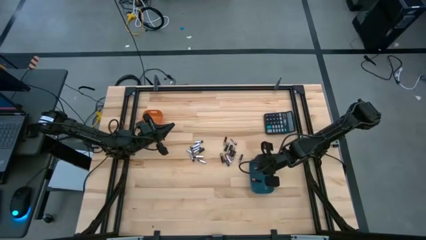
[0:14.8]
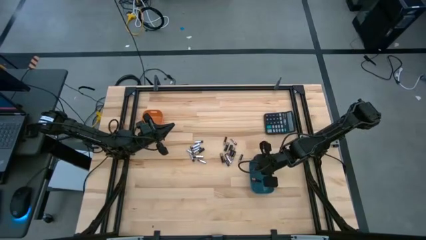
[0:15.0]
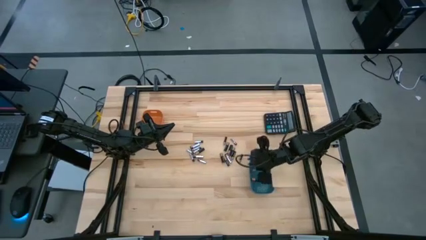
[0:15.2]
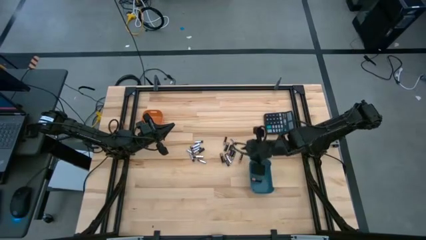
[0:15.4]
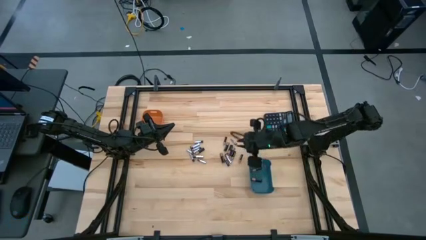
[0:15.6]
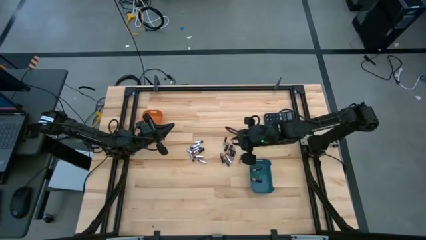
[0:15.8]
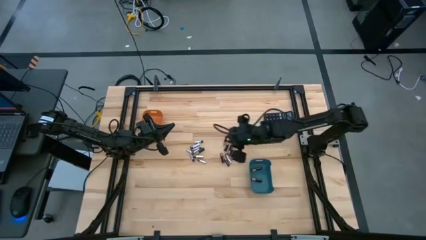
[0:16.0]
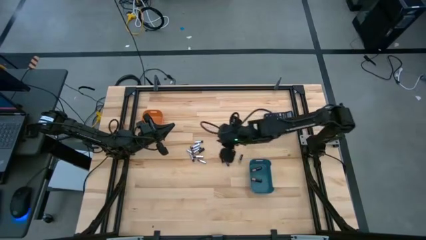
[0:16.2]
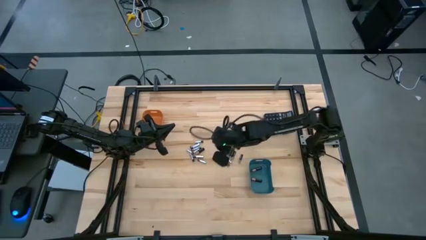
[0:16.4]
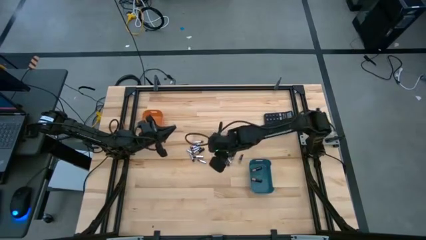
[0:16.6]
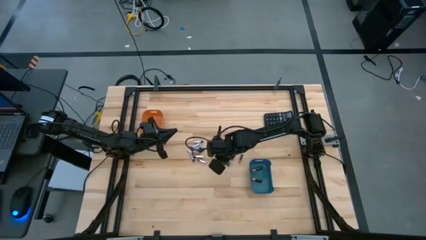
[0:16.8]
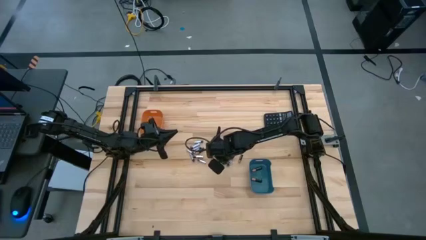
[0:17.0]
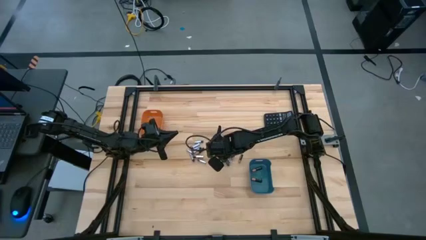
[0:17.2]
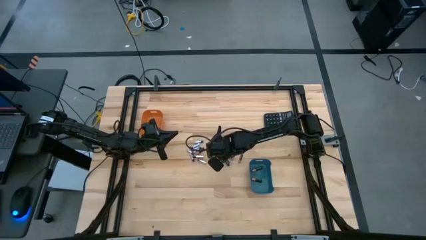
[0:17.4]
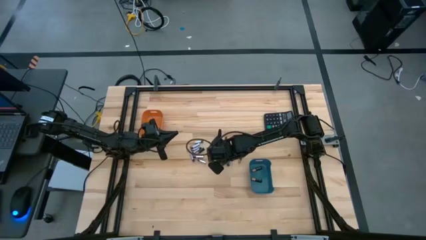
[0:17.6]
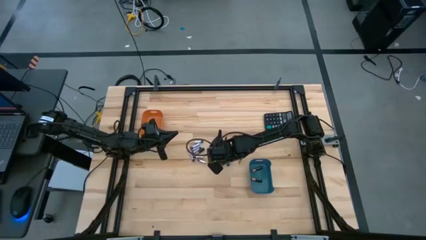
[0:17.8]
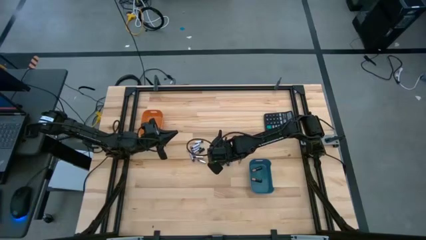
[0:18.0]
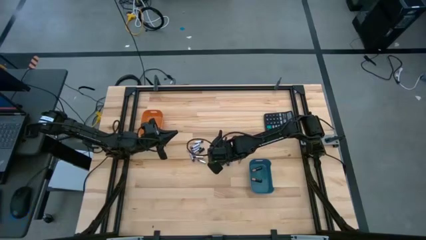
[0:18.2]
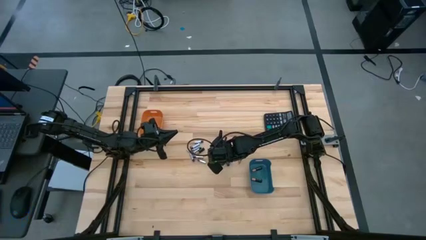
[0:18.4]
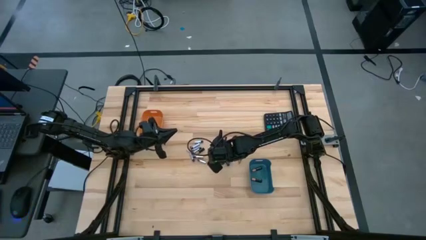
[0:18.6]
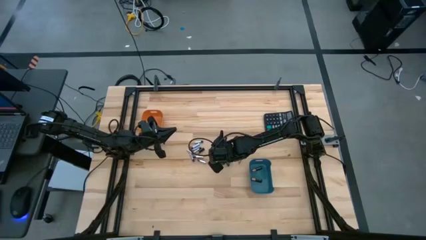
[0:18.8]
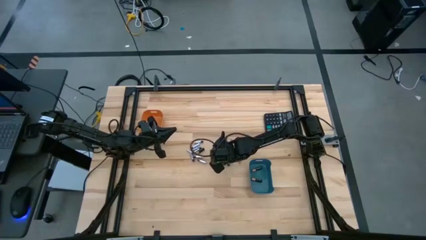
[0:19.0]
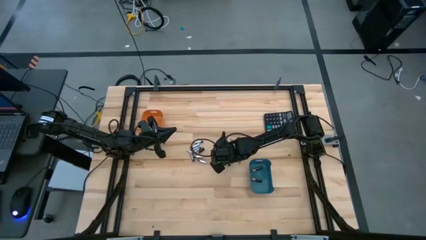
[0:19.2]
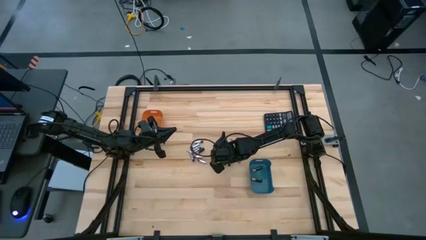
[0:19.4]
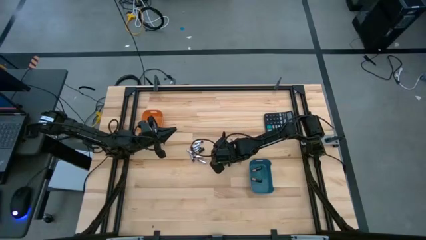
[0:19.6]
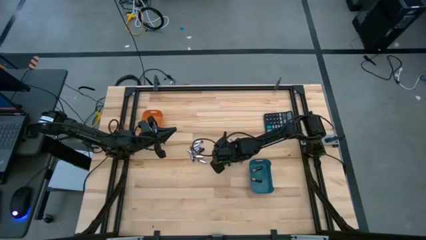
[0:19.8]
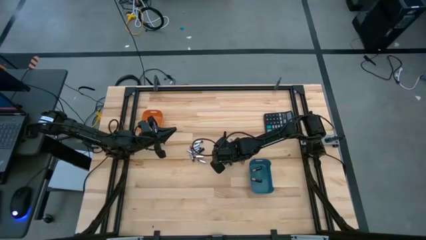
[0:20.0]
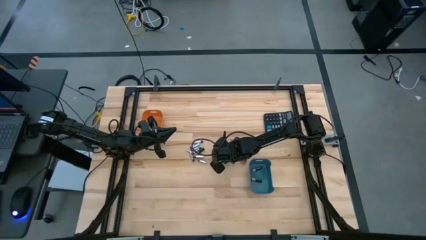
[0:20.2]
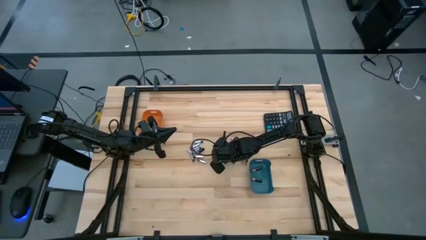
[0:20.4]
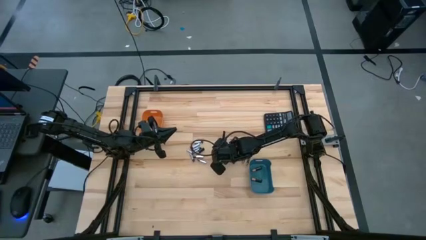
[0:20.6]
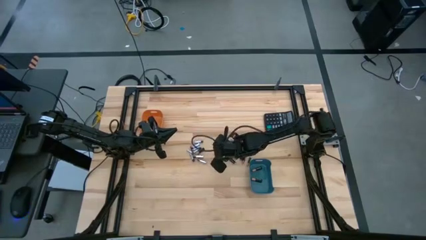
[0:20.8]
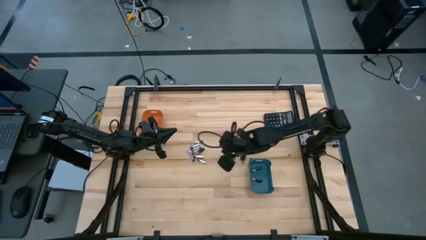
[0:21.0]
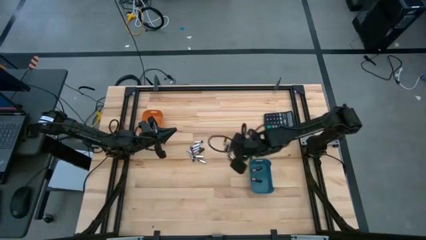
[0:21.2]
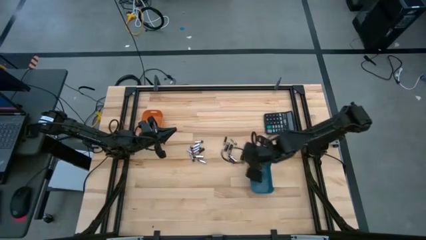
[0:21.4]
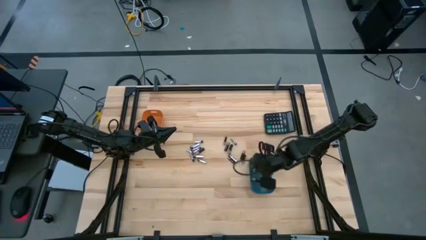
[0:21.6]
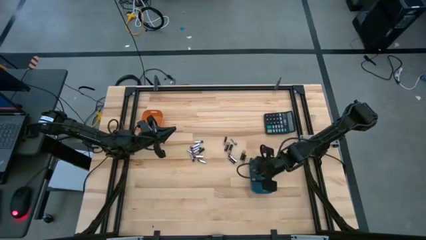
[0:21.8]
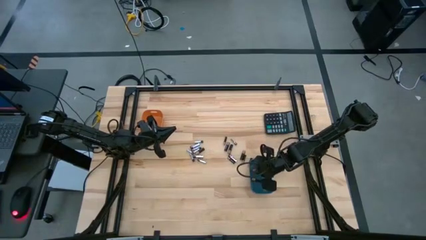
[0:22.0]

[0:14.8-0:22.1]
Task: Sort batteries
Put the black battery into the blue bin

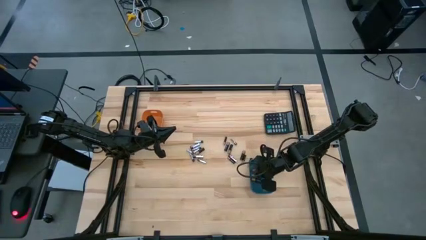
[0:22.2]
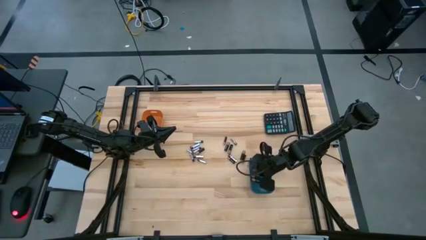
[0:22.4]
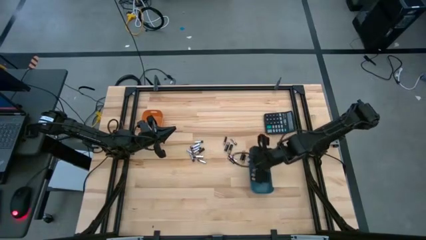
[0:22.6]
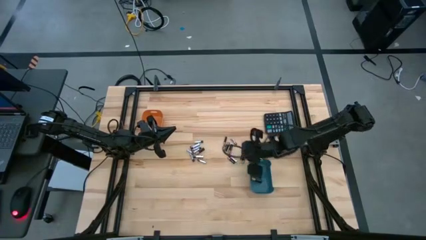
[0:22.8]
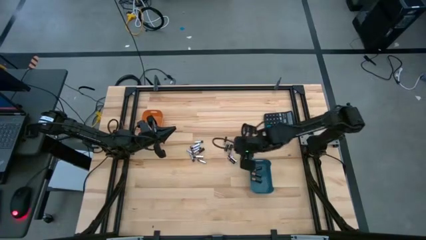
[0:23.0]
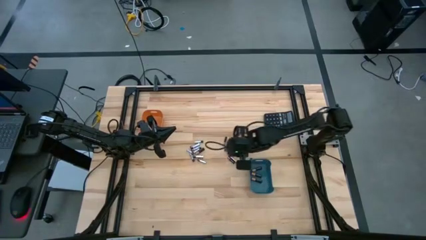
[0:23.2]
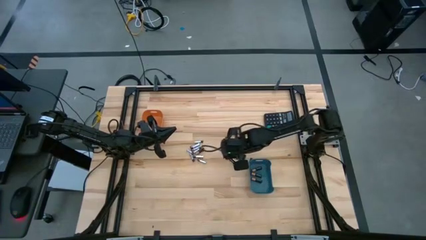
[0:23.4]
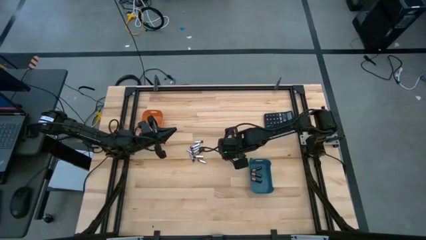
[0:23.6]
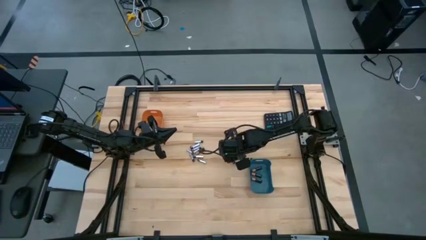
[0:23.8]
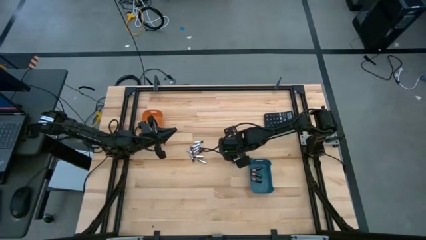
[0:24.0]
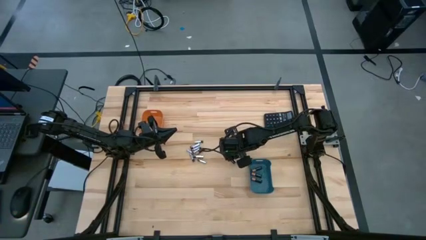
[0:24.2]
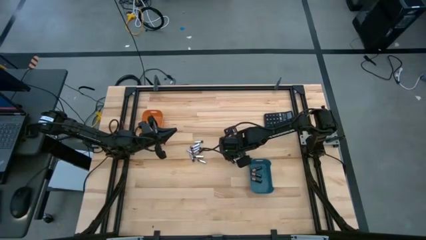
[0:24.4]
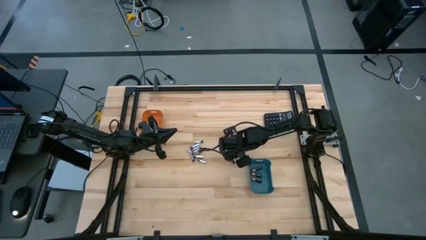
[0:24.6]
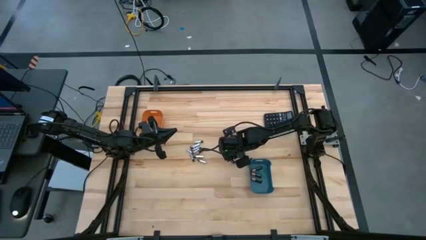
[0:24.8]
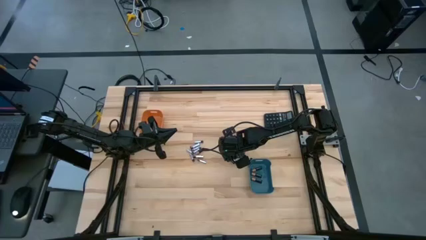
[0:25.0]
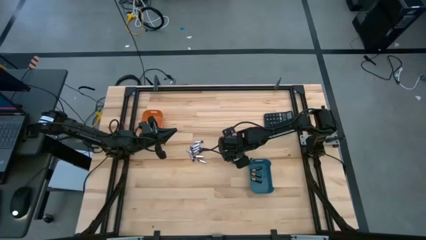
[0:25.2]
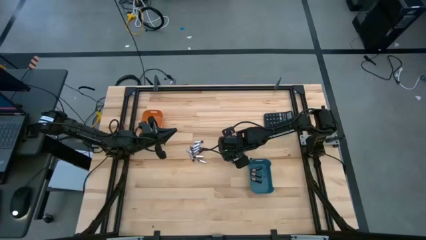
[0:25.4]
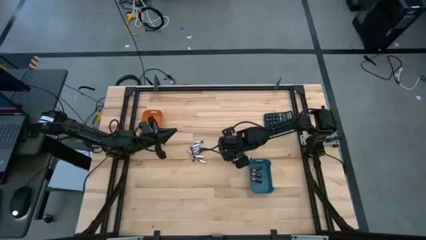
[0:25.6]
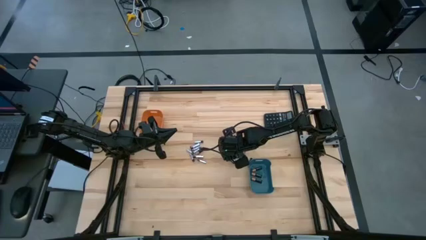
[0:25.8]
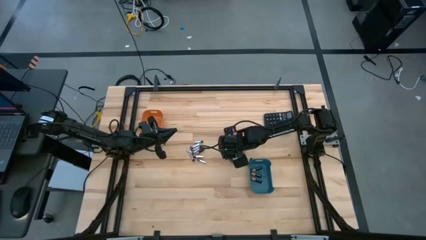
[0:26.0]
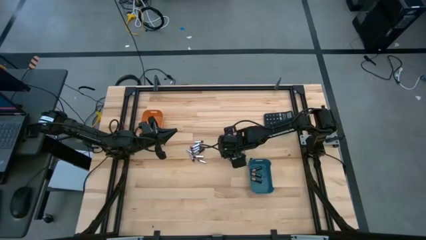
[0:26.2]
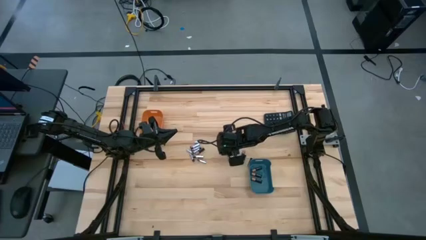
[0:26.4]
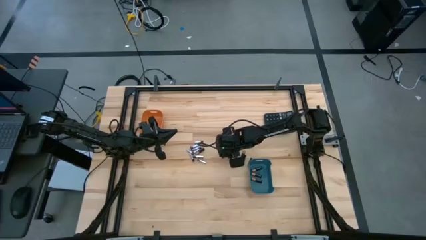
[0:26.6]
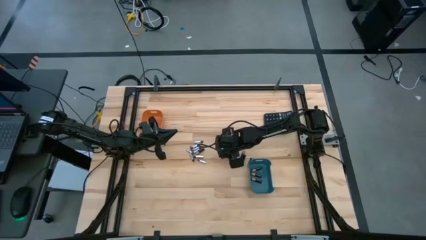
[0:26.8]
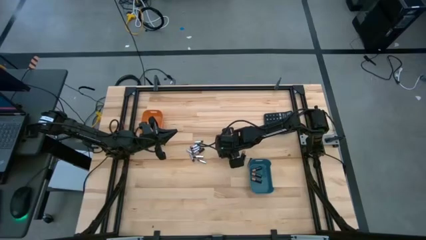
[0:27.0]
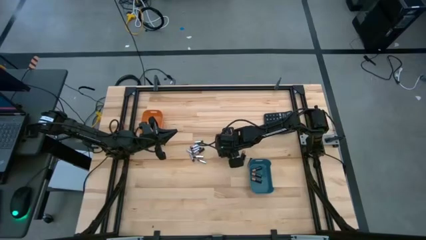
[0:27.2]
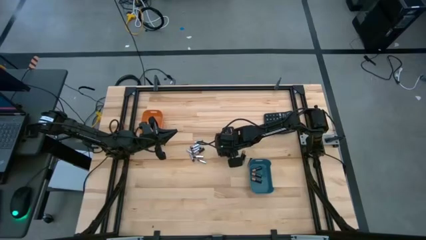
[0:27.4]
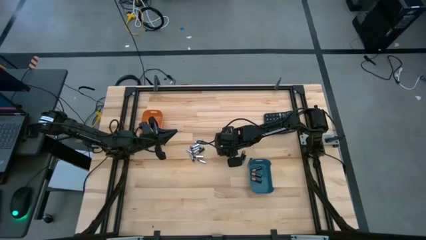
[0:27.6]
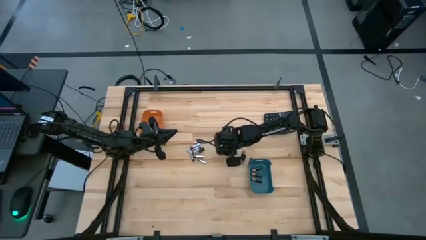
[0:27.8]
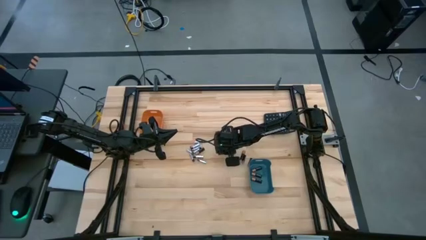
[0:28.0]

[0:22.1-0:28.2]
Put the black battery into the blue bin

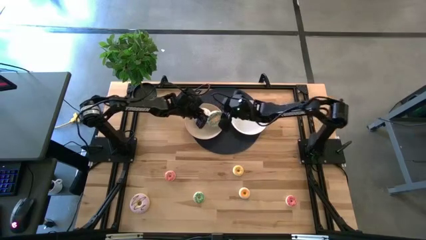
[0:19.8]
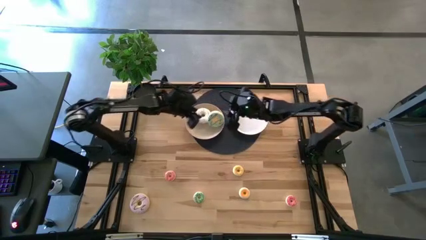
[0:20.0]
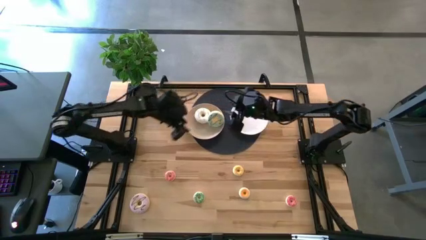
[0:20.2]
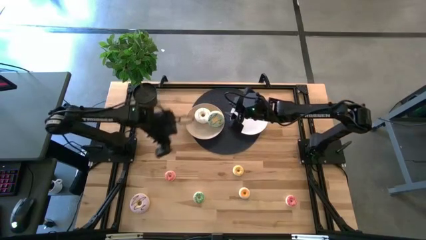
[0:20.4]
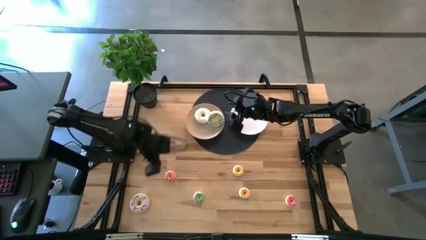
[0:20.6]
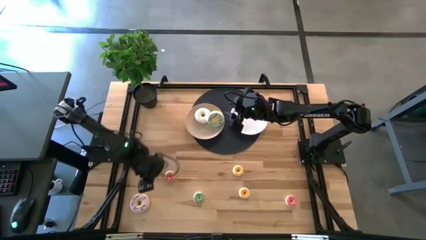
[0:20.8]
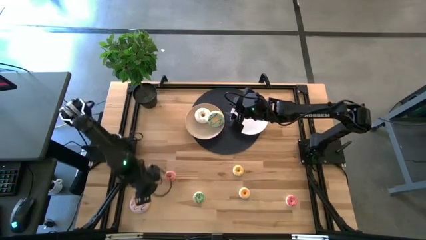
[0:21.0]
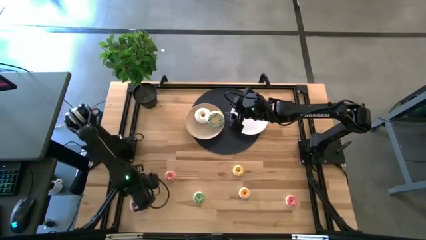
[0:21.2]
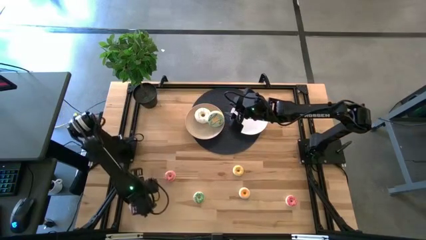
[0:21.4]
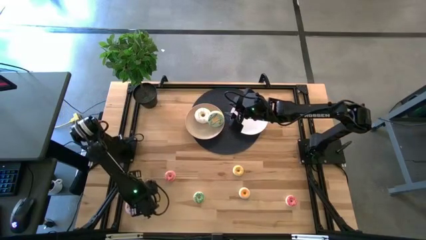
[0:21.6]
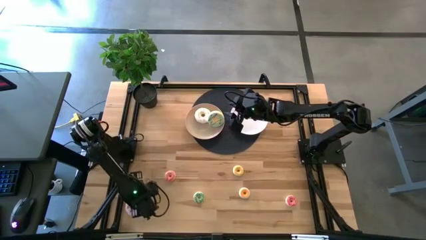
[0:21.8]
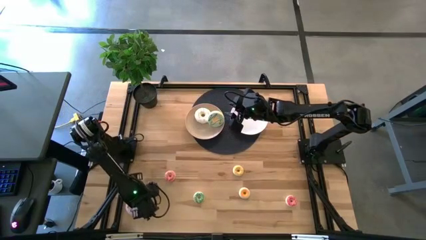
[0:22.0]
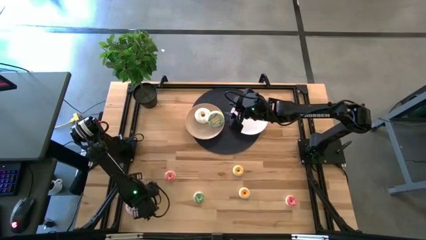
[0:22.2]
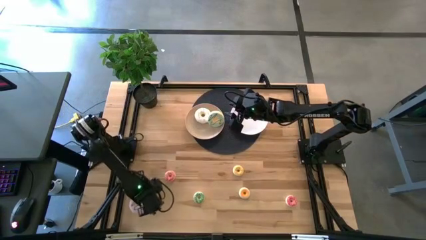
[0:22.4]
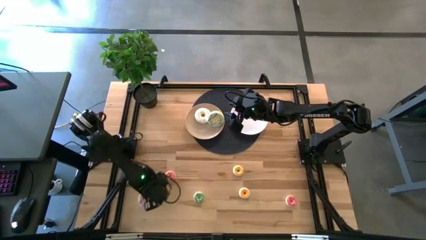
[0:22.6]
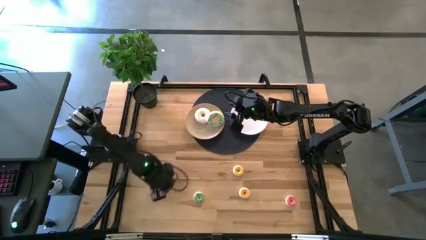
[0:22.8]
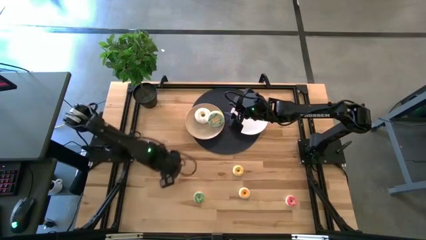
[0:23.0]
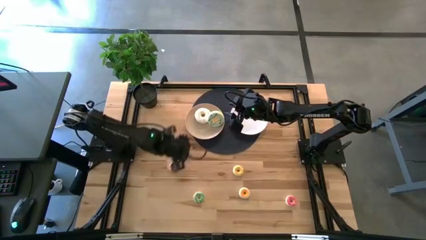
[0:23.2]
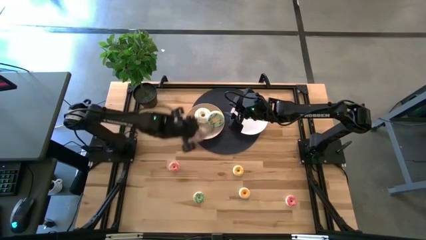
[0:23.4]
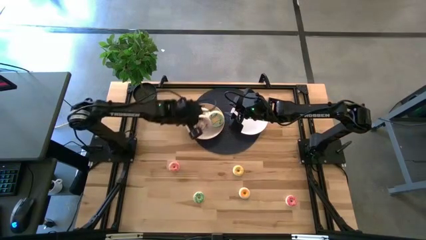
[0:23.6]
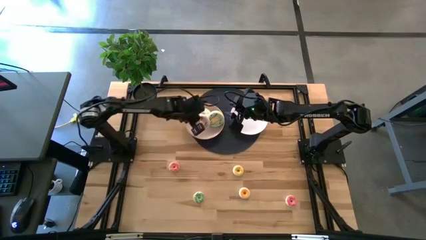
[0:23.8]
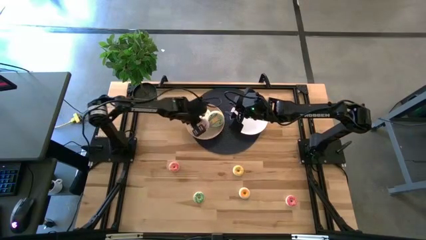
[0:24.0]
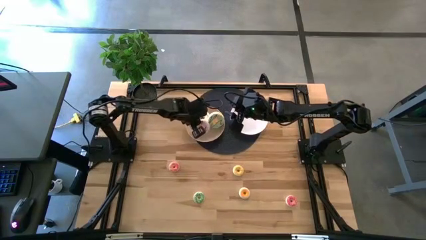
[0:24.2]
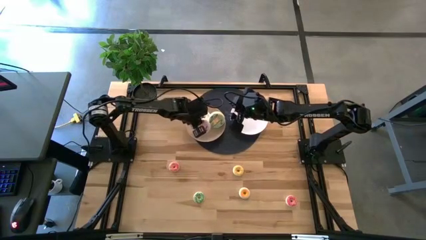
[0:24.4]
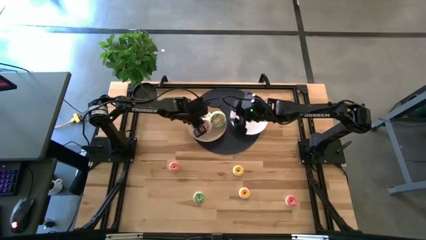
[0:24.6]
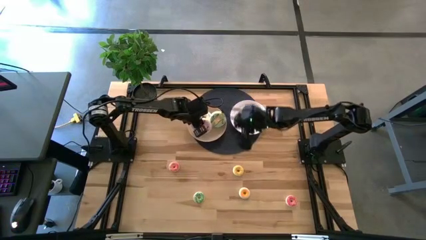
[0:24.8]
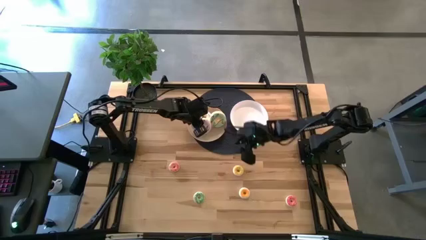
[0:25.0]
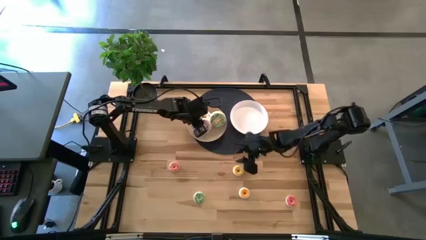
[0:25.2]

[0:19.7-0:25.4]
Task: Pick & Place donuts
Put the large purple donut on the white plate
